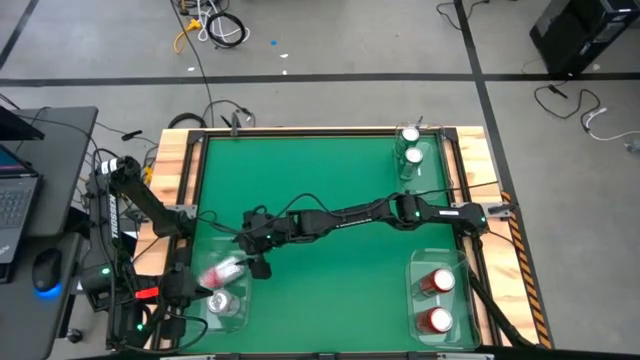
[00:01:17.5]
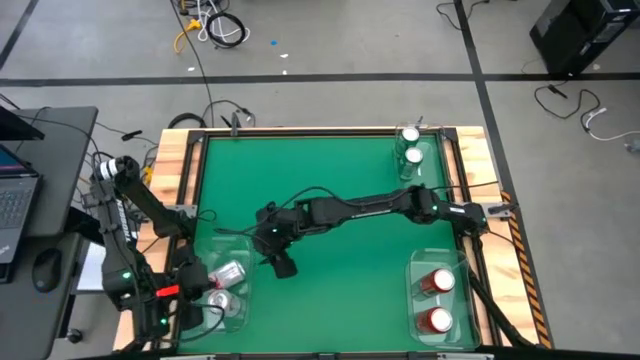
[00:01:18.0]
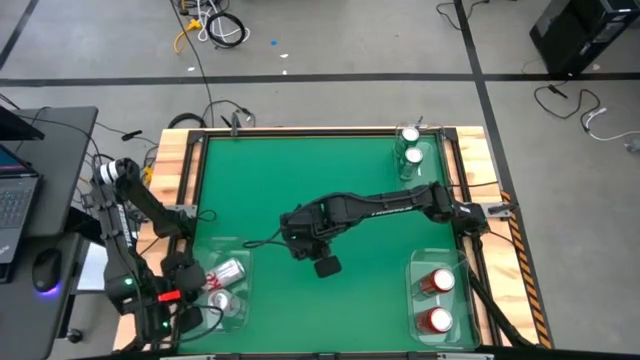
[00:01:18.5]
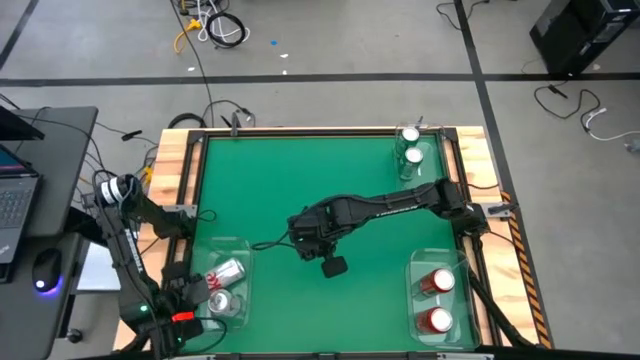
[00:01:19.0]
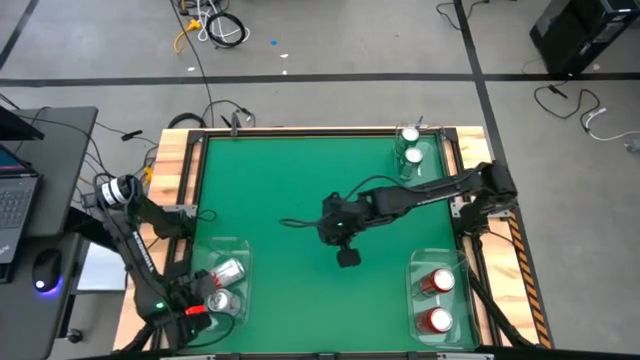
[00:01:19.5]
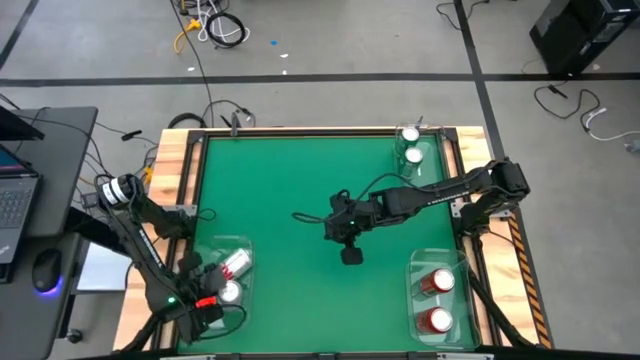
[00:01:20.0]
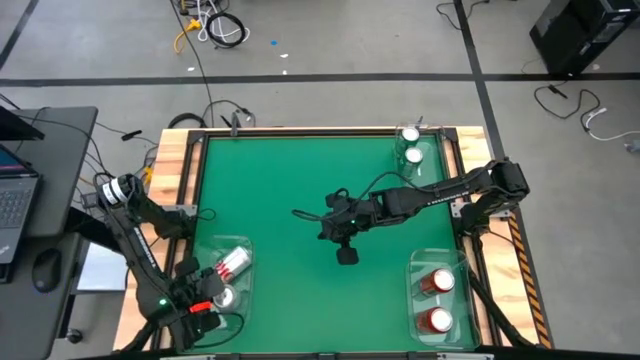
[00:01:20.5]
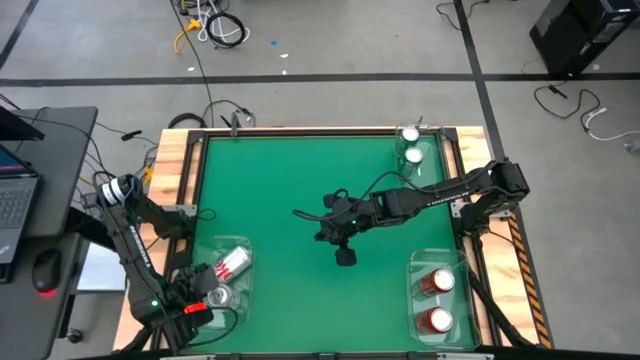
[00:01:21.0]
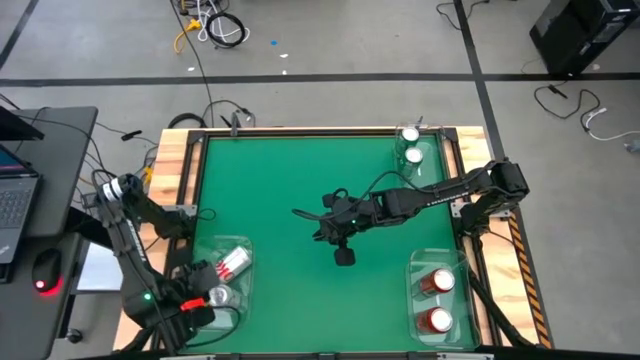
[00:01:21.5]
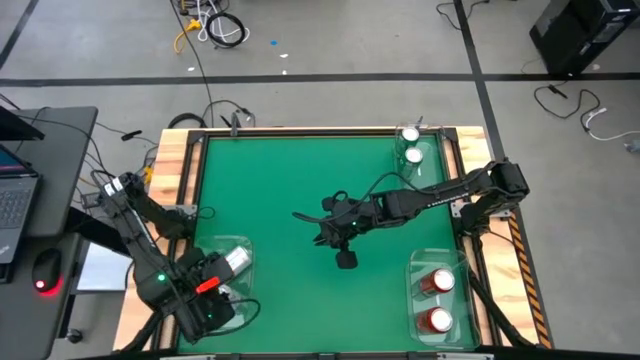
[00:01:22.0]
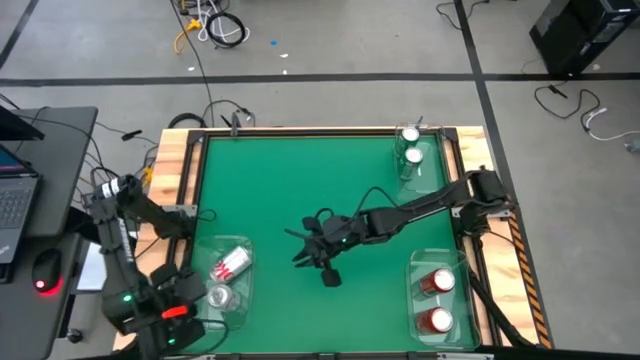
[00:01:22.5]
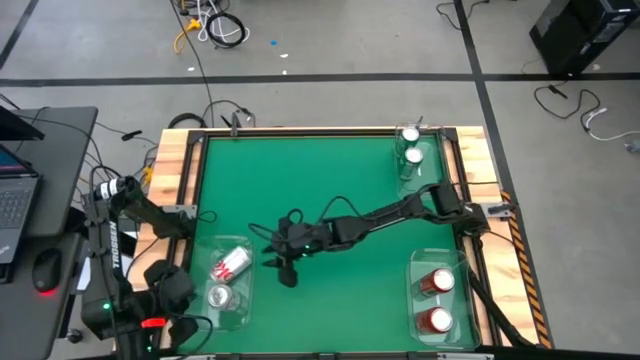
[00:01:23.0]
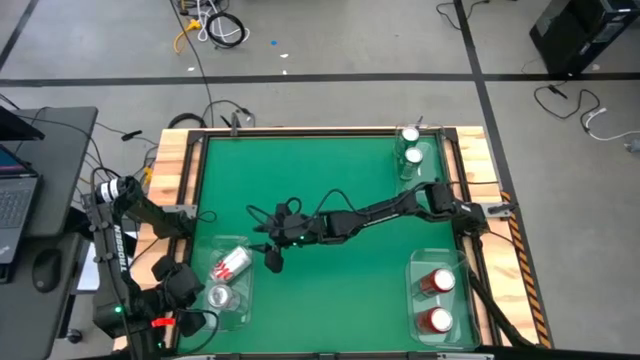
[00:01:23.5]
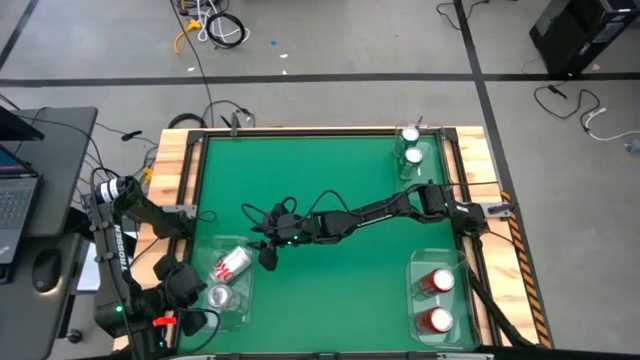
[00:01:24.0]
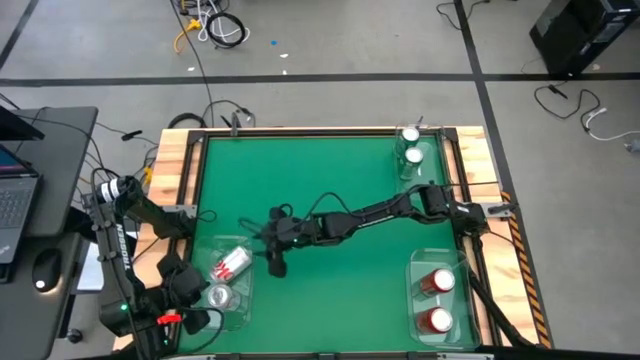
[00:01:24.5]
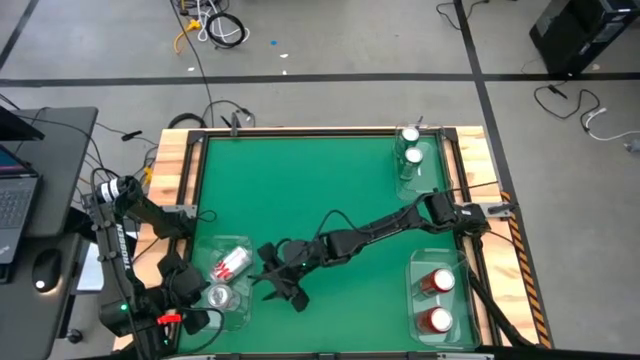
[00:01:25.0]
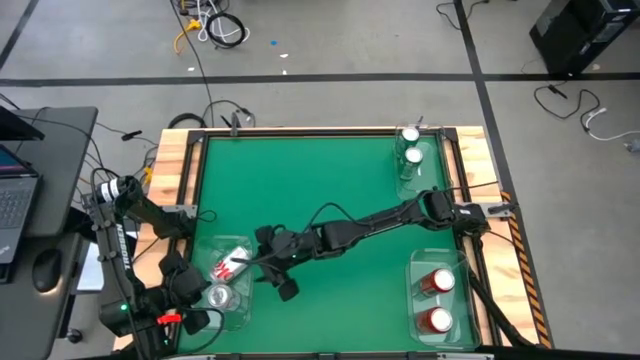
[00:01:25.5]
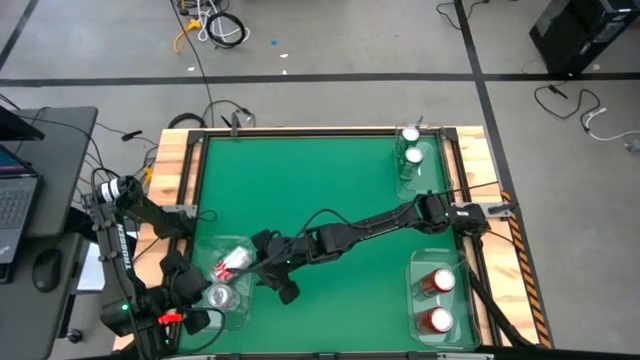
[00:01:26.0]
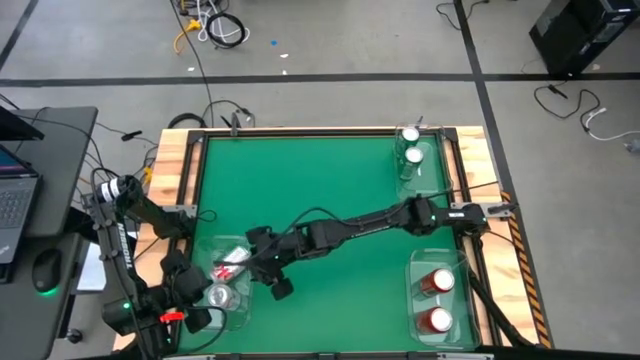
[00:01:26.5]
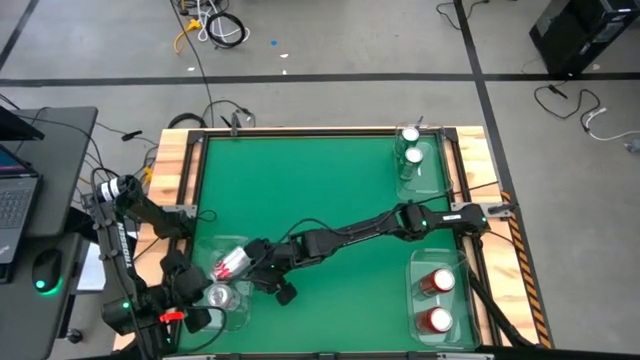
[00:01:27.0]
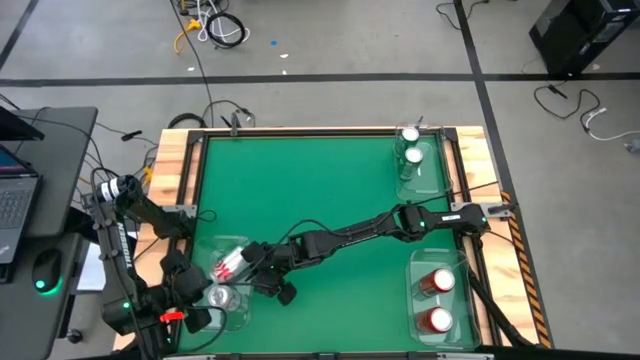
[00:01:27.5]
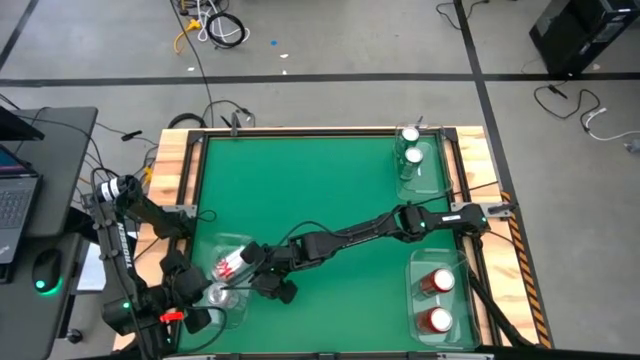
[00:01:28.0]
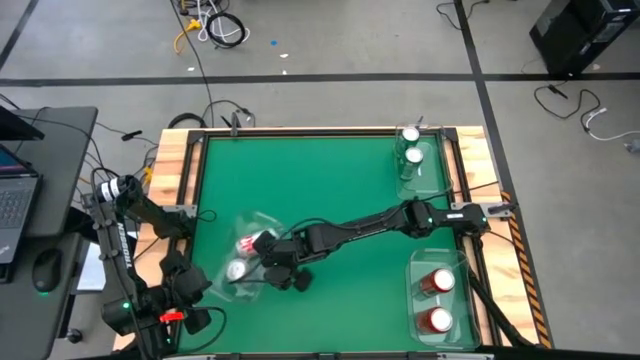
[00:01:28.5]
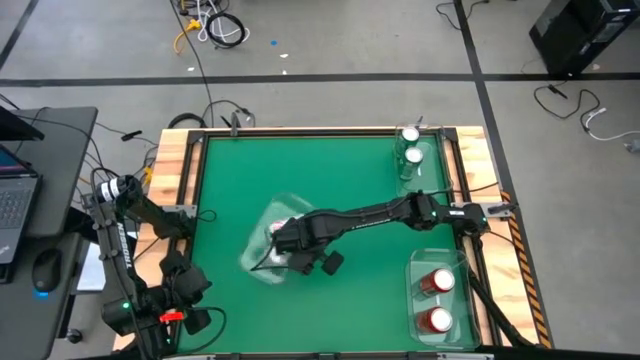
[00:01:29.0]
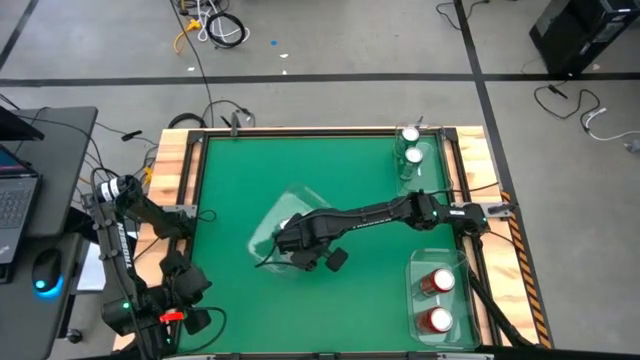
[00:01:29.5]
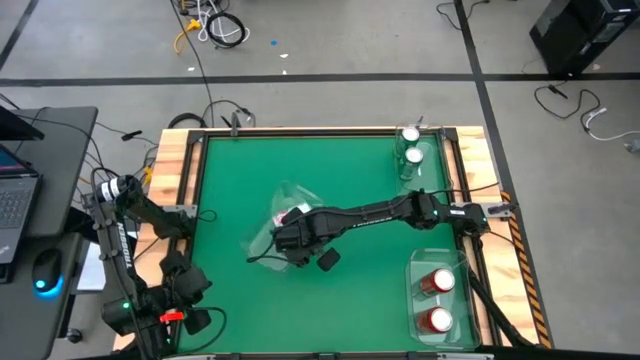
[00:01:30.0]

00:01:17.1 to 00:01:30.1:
Task: Sort soda cans
Move the left transparent bin to the center of the table

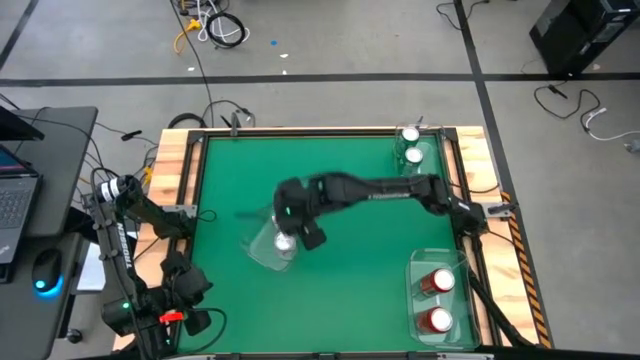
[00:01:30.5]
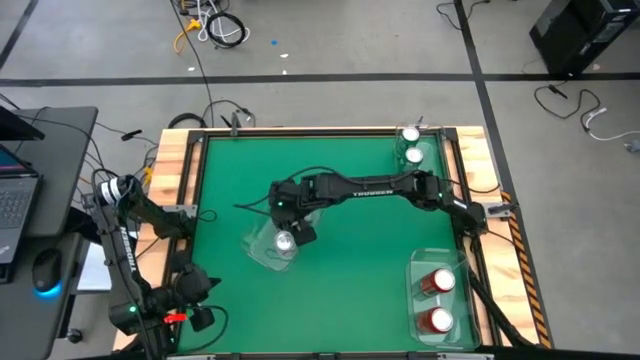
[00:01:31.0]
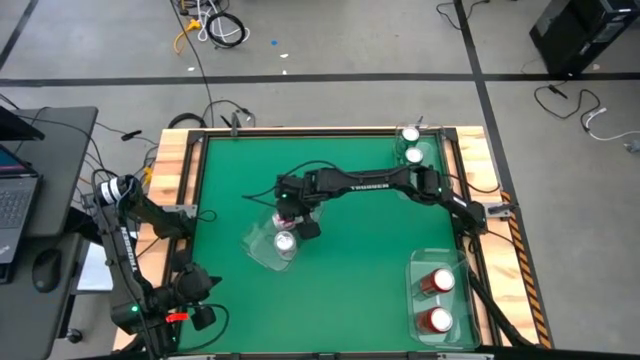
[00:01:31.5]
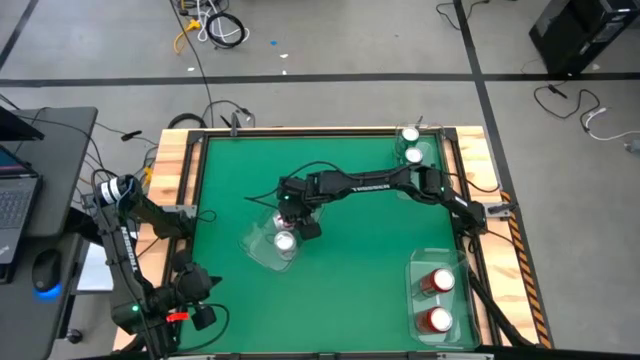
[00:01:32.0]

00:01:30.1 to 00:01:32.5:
Put the red/white soda can into the left transparent bin

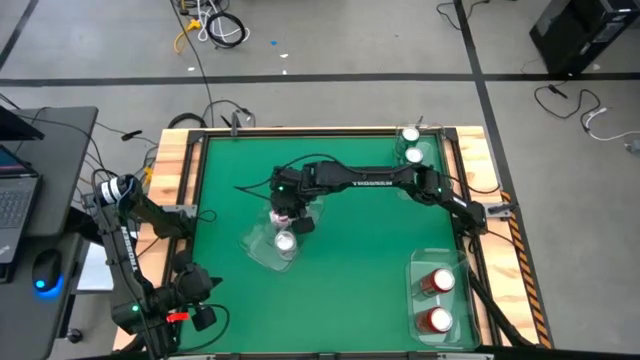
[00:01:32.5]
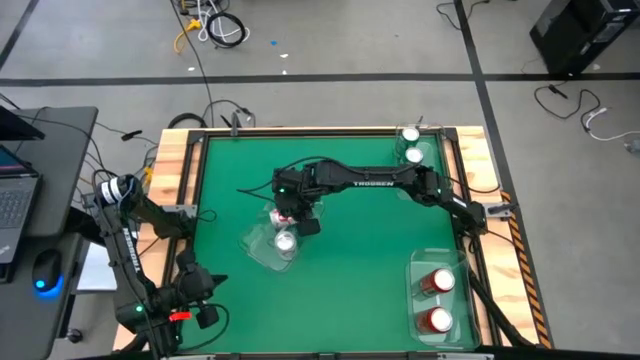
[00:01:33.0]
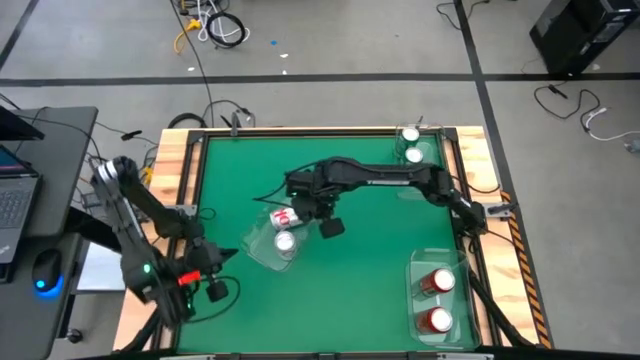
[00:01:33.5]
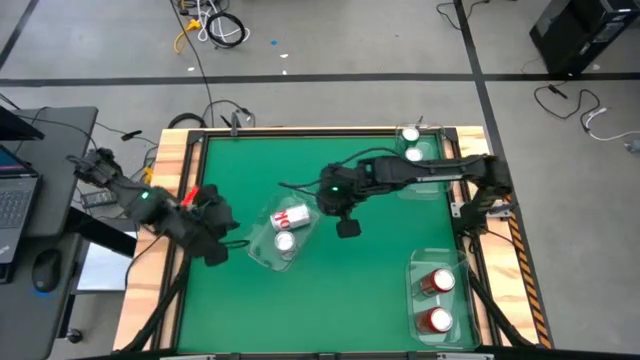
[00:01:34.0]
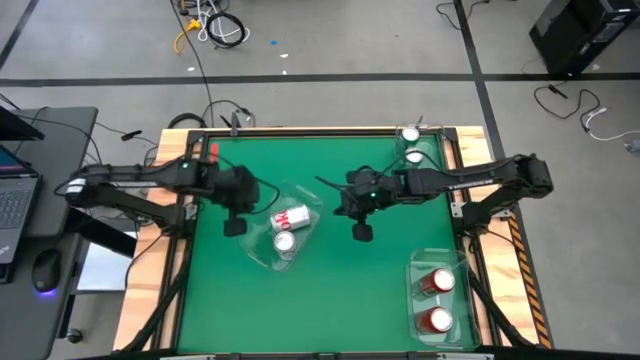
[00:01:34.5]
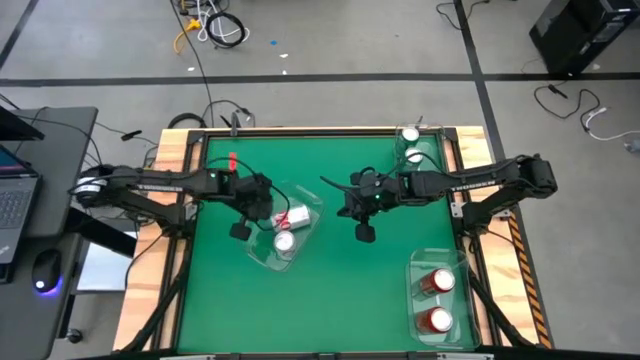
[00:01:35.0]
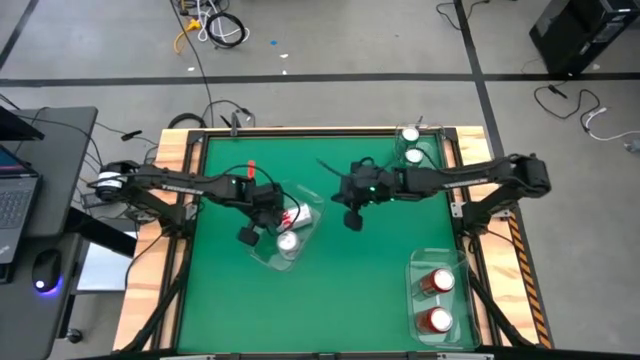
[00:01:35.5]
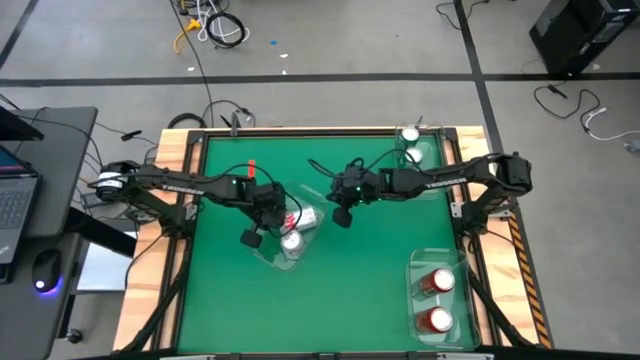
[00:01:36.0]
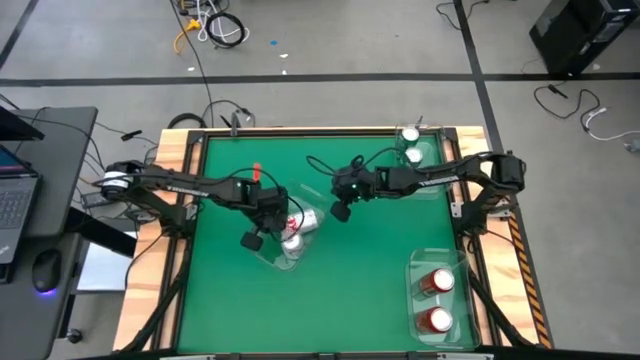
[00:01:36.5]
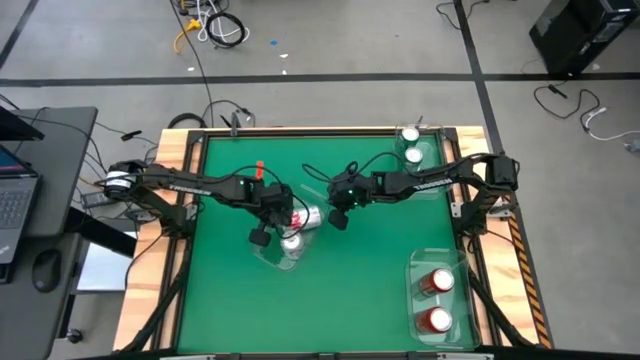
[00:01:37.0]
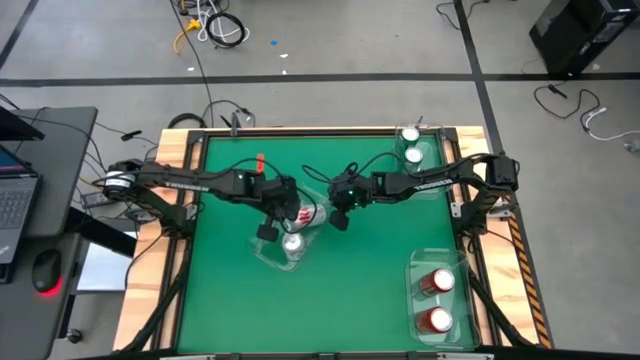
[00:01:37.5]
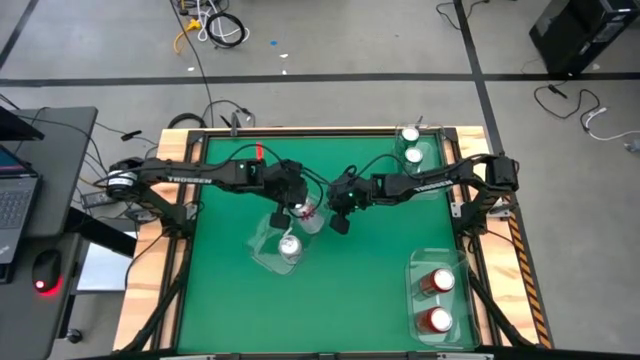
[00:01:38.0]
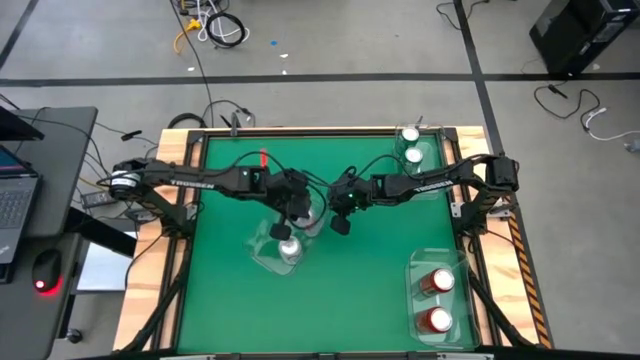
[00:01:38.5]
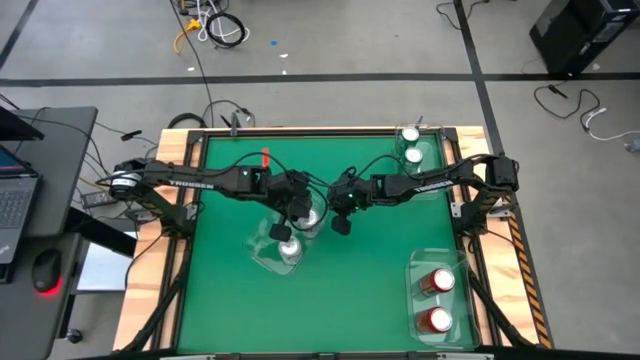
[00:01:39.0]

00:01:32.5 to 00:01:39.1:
Put the red/white soda can into the left transparent bin
